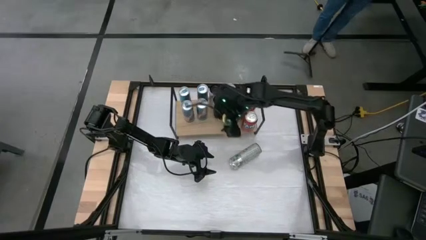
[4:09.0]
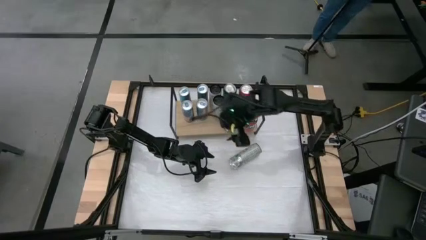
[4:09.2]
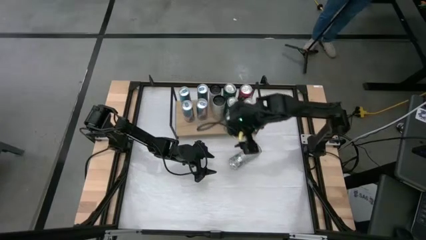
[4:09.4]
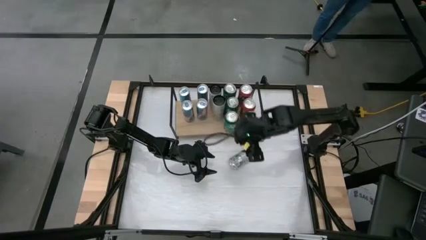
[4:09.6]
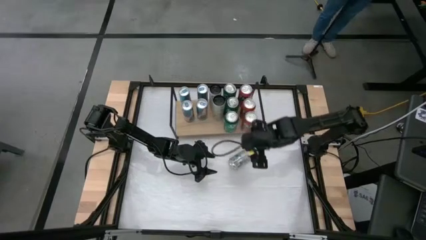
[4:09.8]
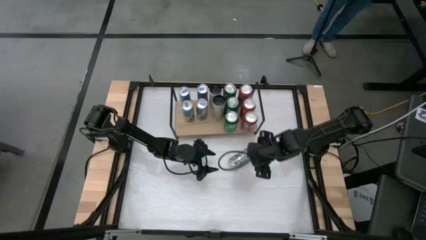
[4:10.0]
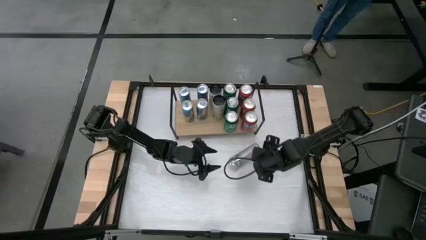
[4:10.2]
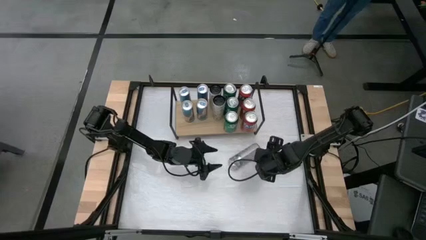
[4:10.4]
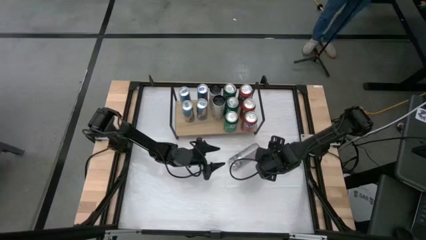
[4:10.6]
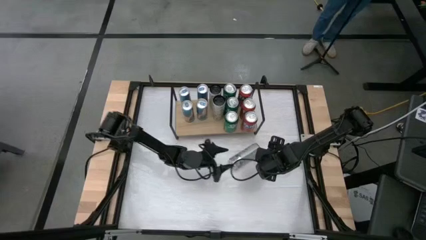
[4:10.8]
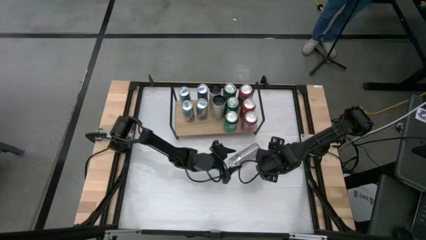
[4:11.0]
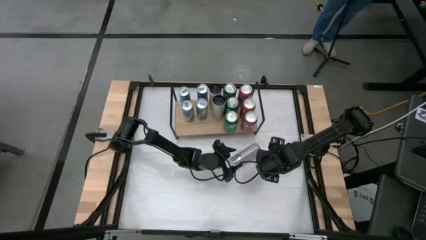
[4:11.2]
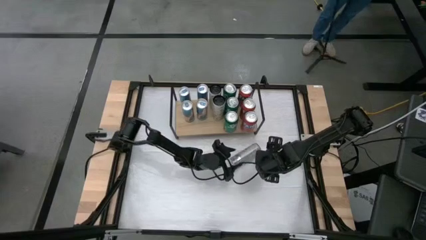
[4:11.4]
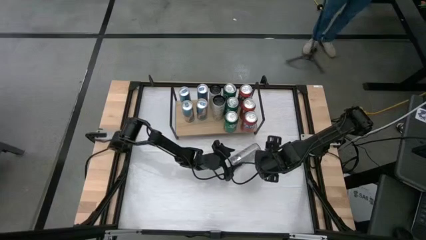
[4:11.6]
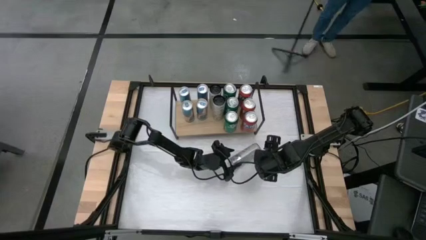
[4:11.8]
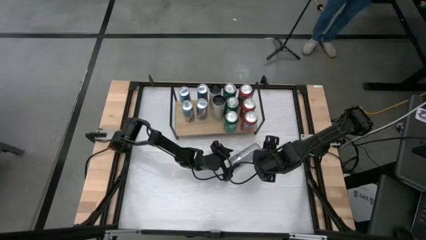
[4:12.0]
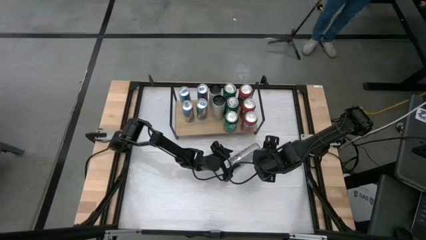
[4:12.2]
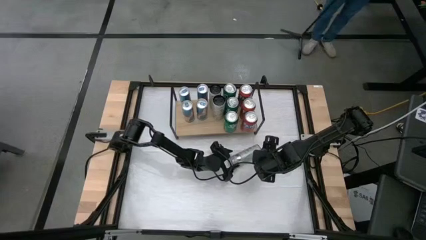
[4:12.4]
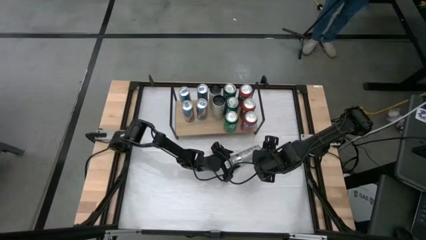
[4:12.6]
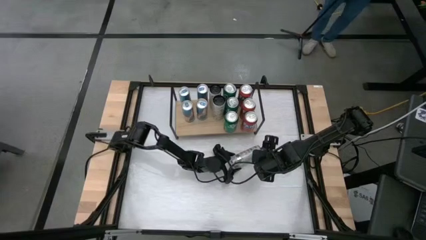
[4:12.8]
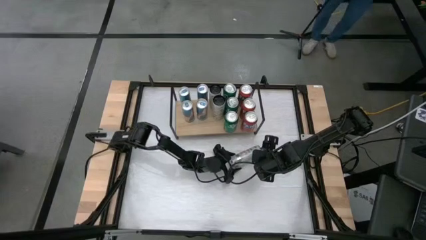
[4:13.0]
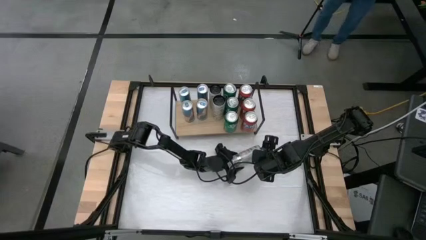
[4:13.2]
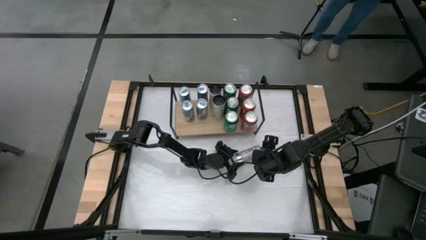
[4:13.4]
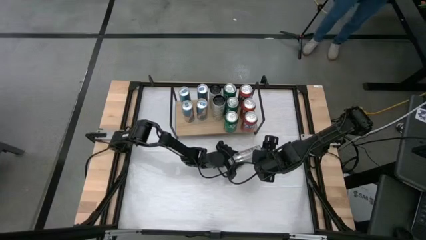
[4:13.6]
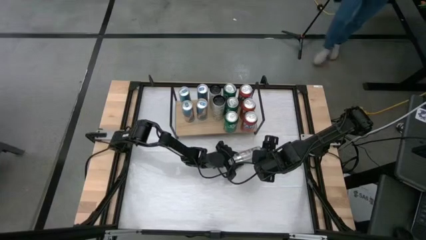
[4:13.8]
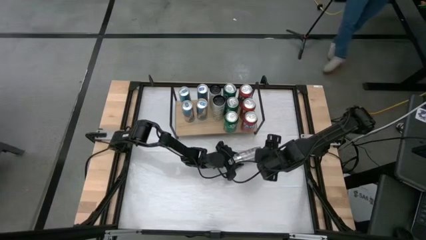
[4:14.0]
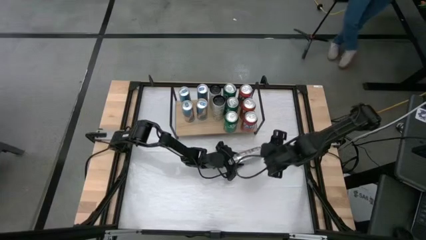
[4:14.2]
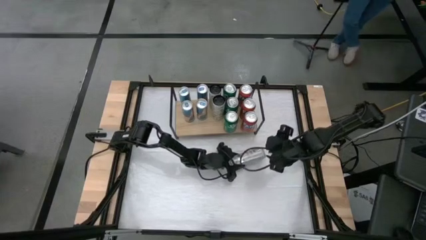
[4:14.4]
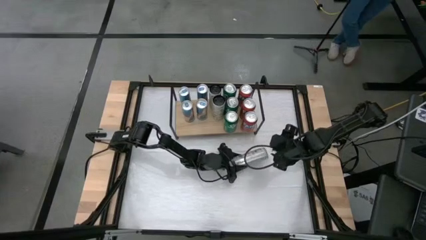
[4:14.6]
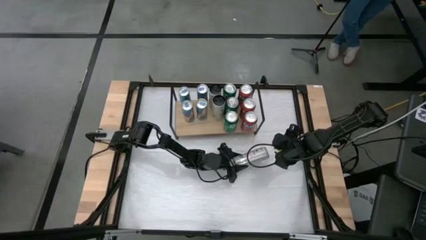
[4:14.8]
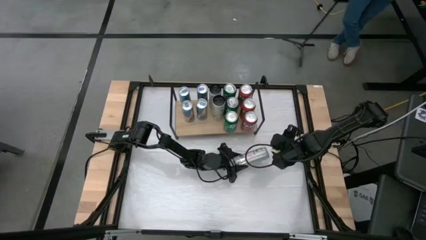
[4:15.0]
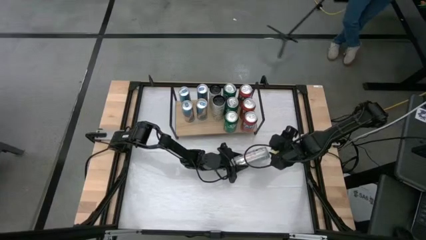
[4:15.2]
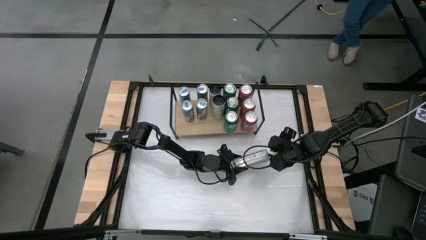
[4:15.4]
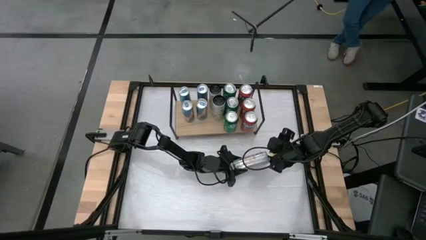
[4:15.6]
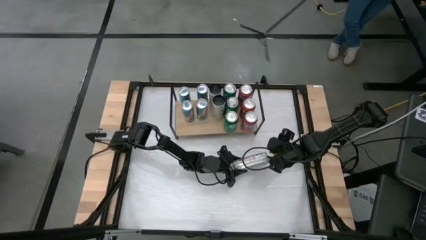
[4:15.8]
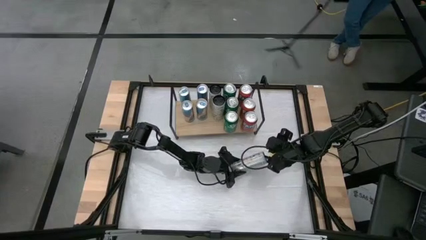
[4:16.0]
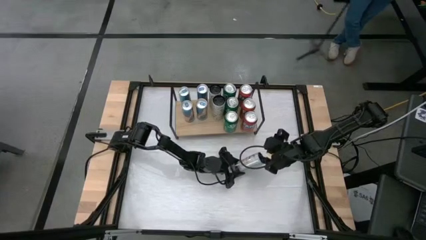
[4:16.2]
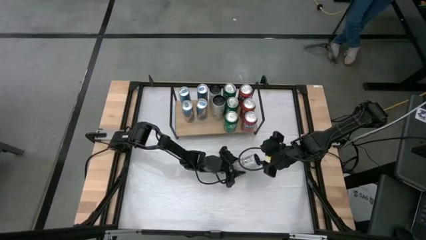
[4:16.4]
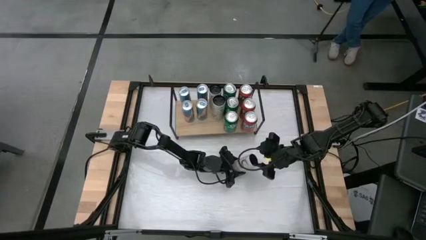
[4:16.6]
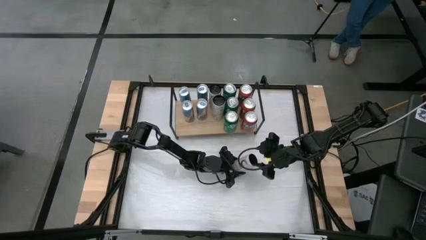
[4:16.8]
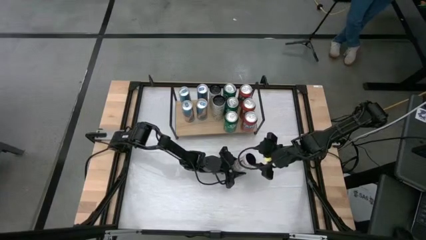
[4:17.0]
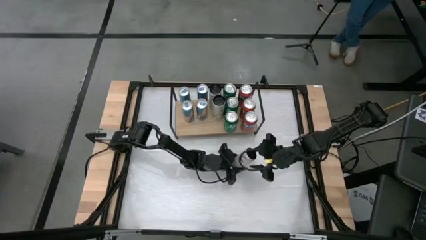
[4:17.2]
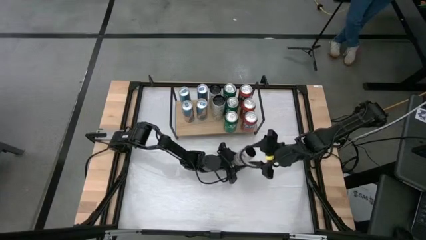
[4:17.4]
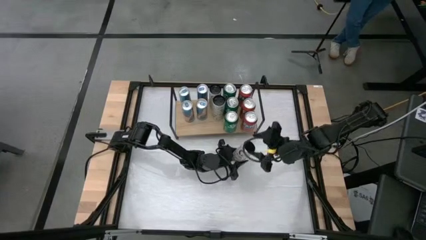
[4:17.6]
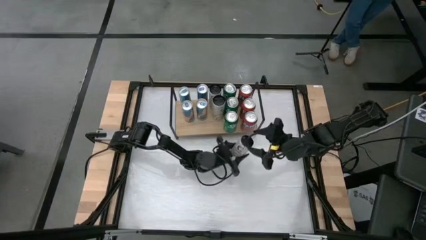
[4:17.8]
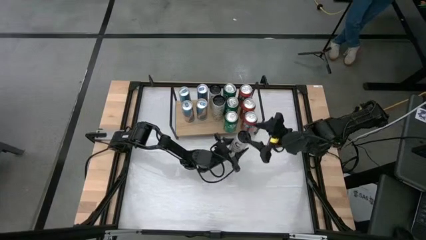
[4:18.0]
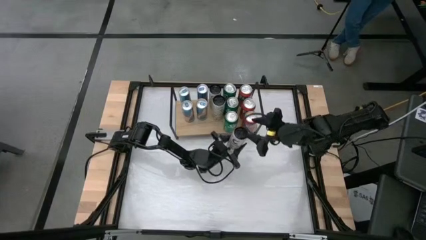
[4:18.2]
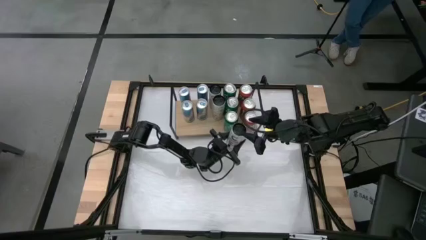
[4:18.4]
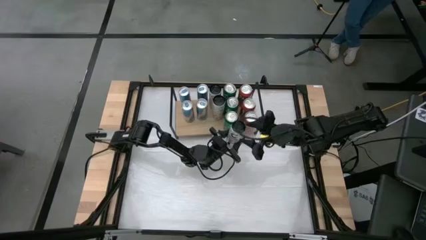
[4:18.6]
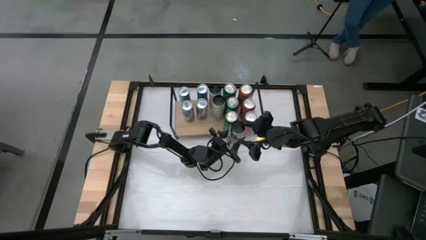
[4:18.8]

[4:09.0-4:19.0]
Task: Sort soda cans
Put the white-yellow soda can on the shelf and align with the other white-yellow soda cans

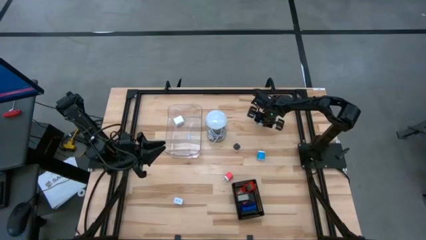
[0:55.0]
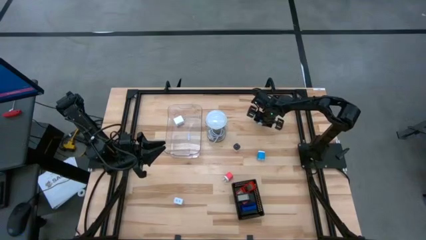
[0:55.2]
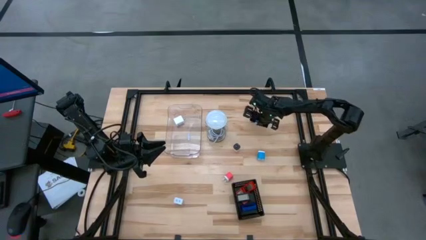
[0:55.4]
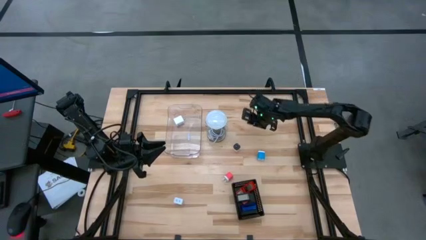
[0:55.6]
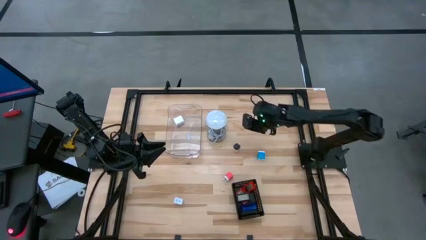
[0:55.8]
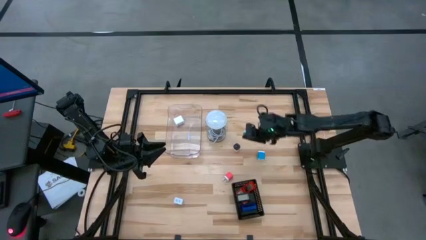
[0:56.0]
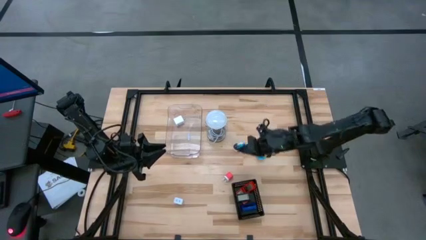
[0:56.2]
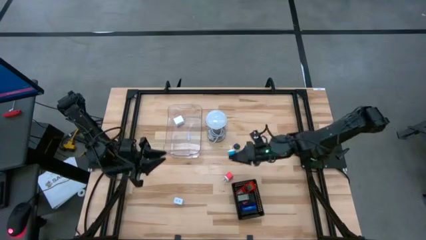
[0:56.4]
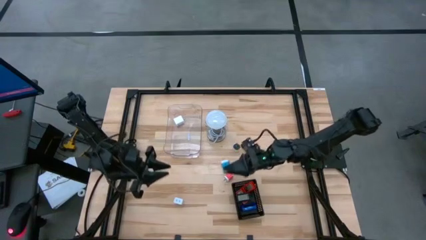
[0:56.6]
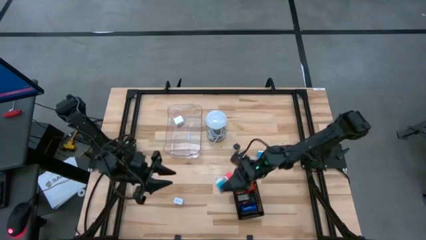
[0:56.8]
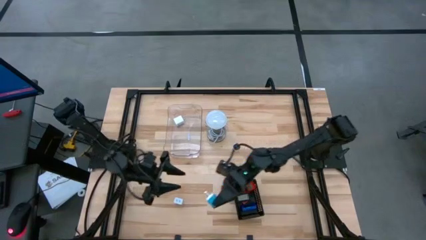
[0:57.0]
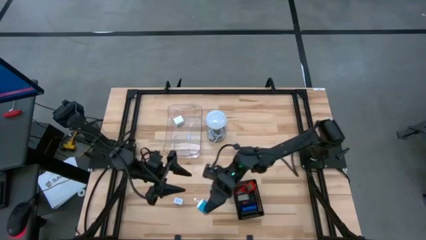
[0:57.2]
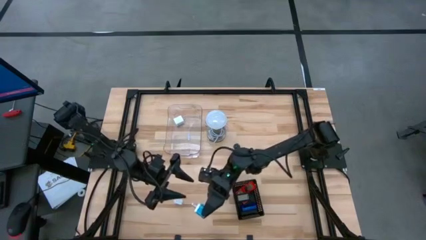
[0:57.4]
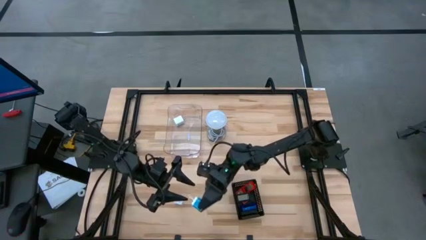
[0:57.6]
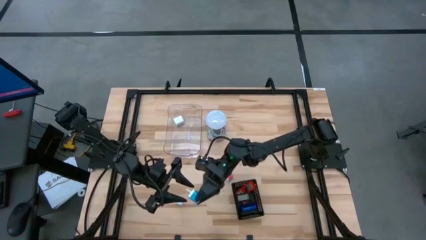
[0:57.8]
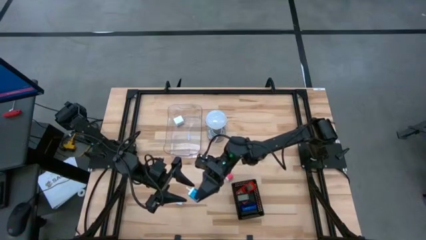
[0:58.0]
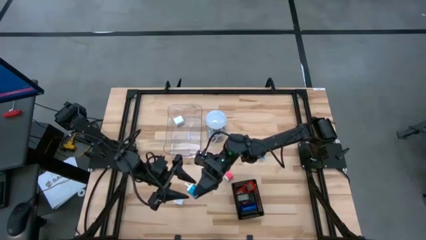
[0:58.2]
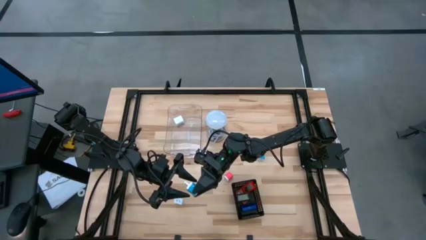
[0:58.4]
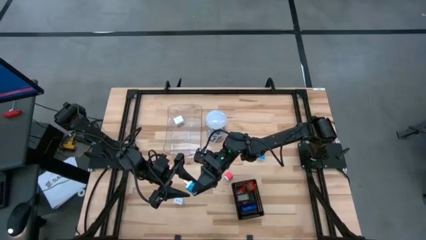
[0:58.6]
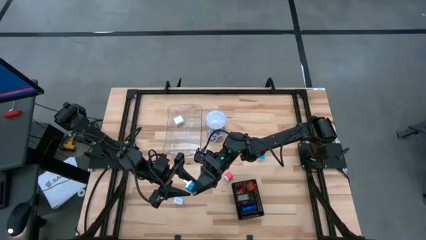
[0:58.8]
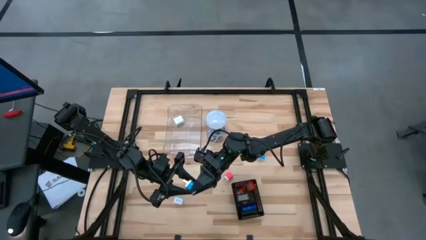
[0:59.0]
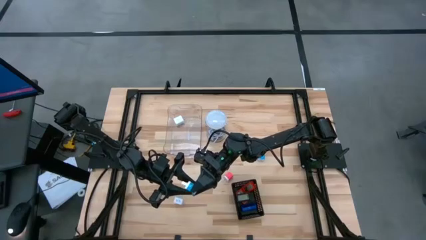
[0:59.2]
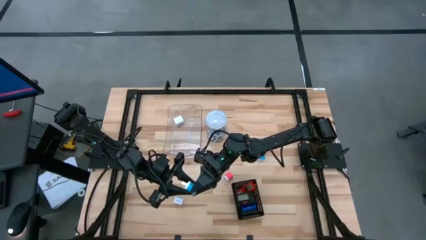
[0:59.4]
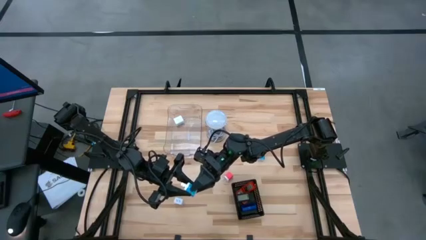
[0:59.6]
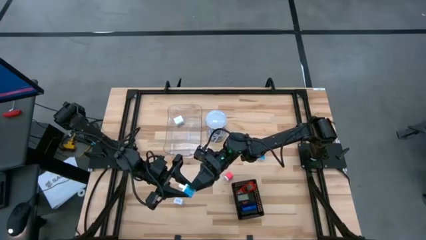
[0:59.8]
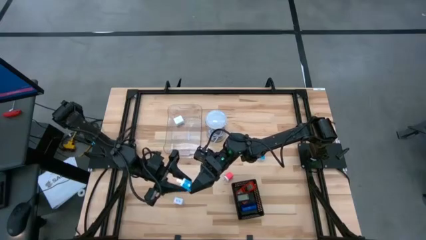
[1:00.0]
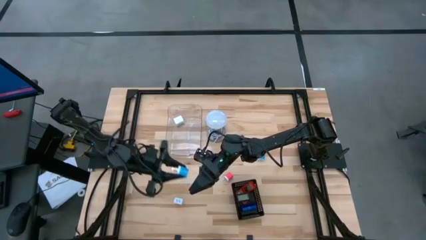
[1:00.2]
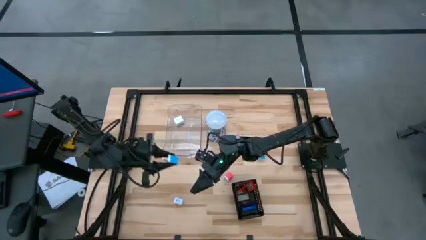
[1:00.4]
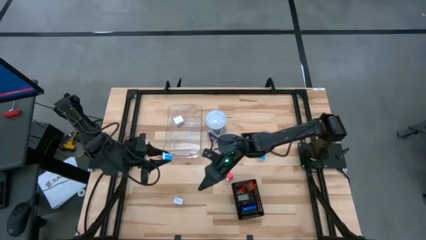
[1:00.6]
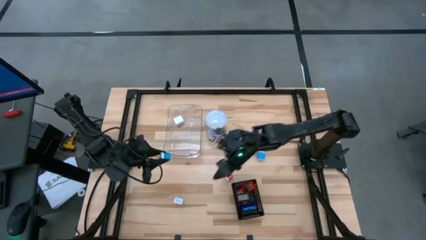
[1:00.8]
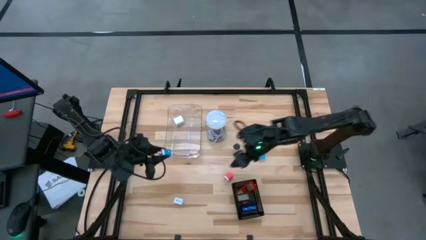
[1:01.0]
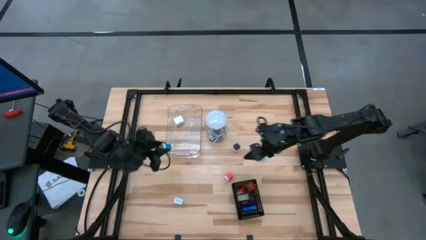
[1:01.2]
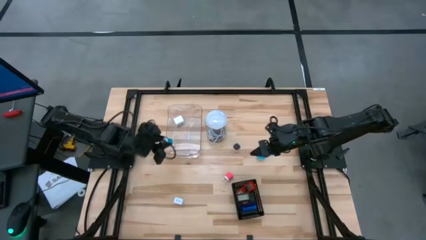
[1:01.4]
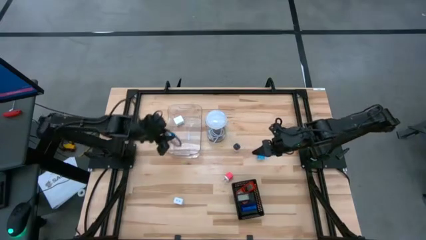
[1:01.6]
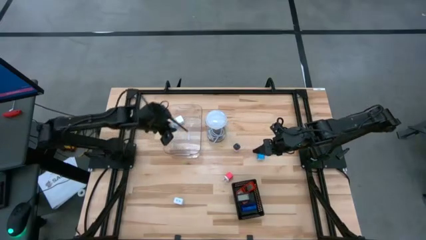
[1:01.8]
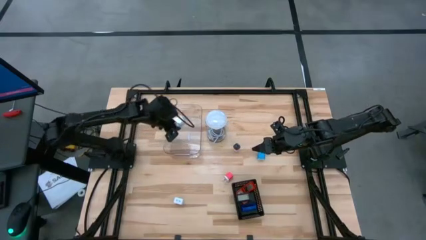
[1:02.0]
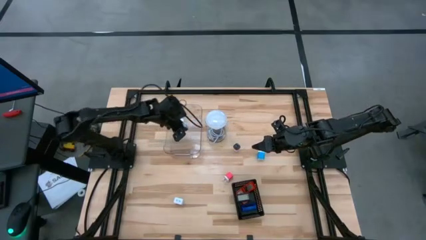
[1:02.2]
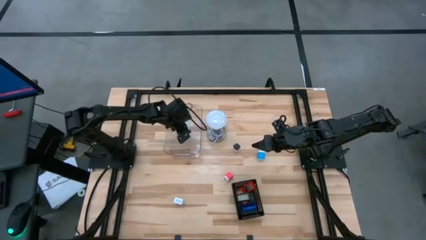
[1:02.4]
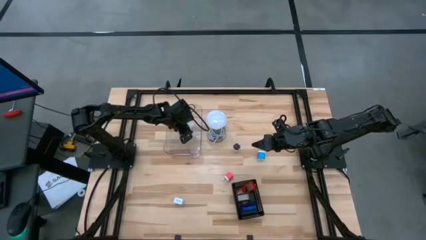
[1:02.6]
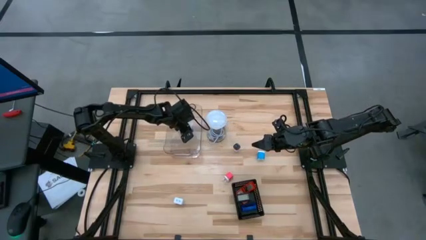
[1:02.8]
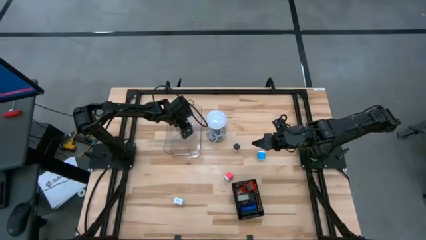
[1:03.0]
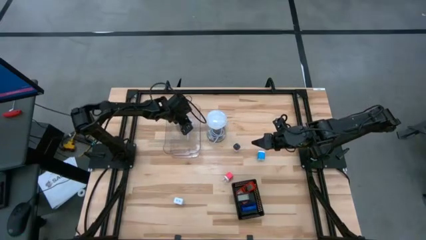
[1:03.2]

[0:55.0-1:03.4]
Task: Pick & Place Office items
Put the top blue charger adapter into the transparent bin
